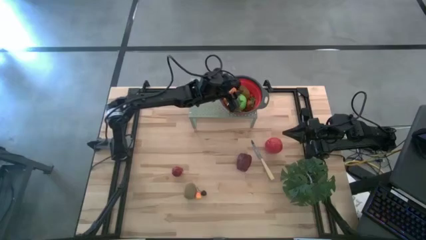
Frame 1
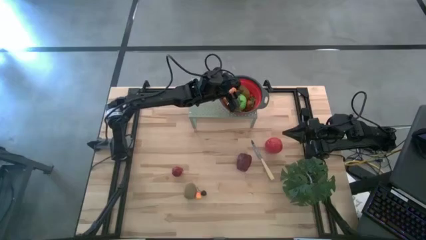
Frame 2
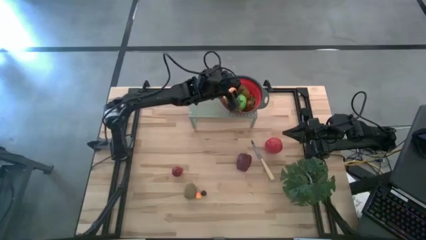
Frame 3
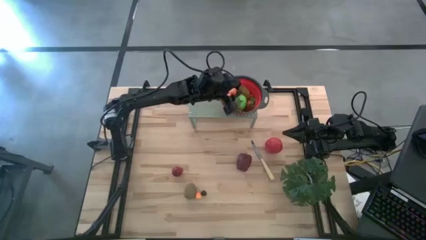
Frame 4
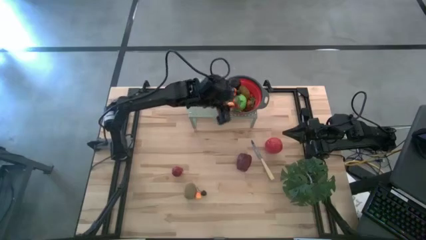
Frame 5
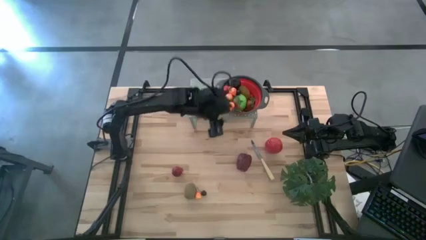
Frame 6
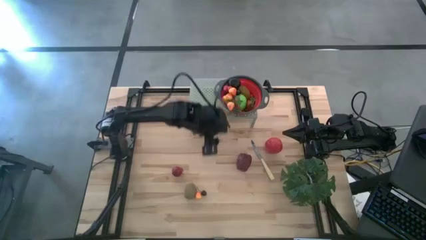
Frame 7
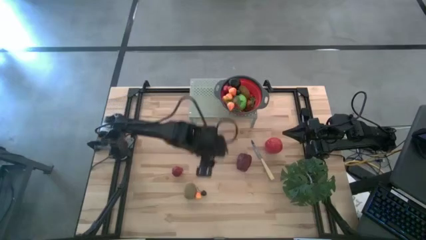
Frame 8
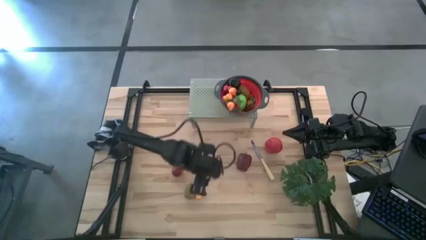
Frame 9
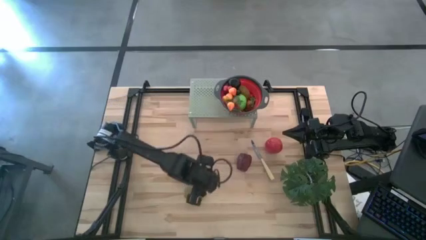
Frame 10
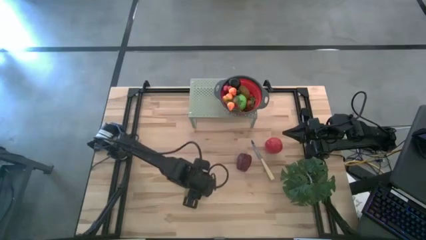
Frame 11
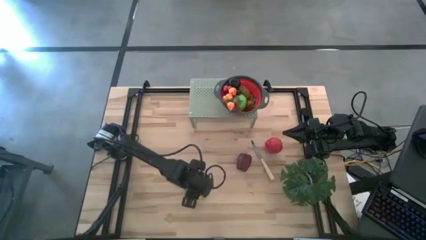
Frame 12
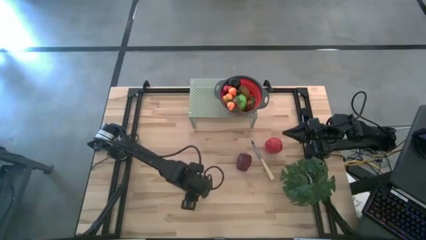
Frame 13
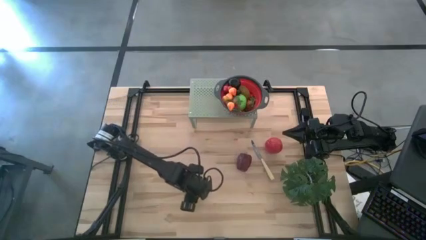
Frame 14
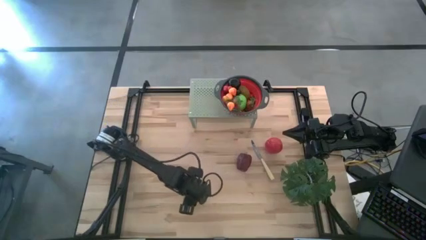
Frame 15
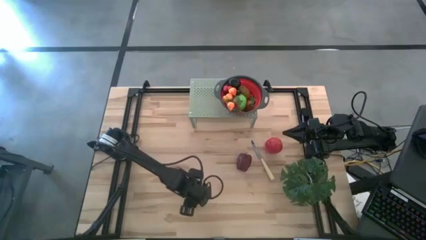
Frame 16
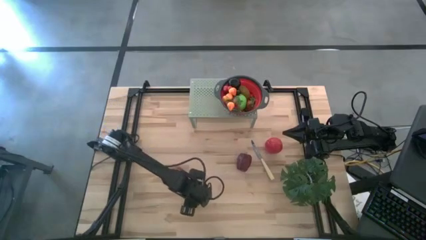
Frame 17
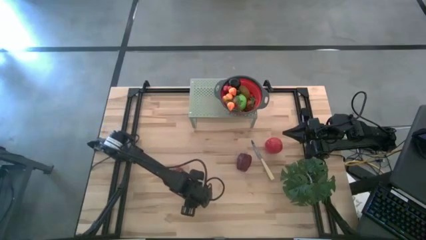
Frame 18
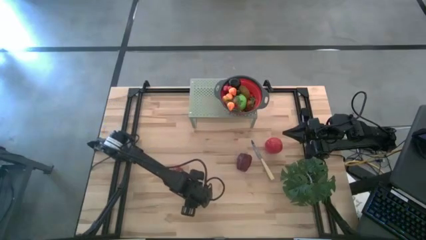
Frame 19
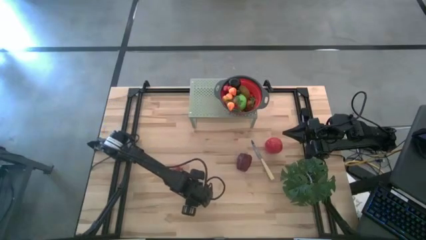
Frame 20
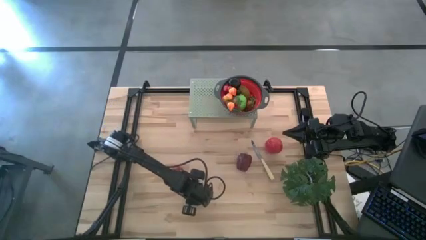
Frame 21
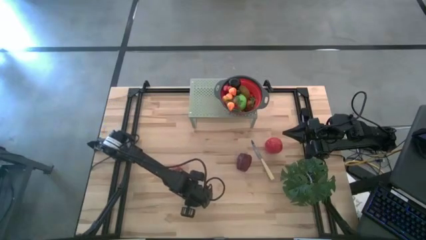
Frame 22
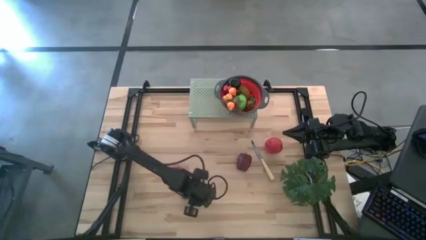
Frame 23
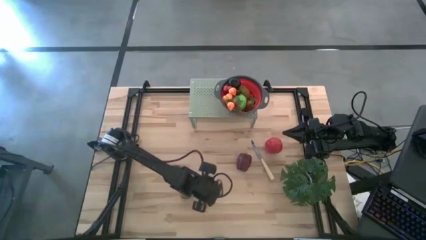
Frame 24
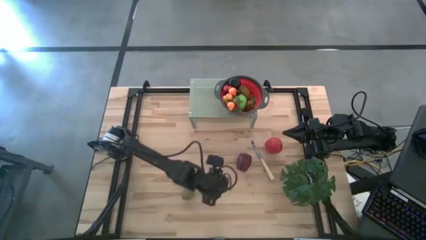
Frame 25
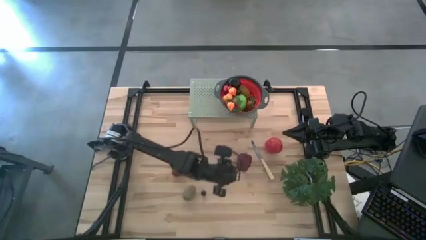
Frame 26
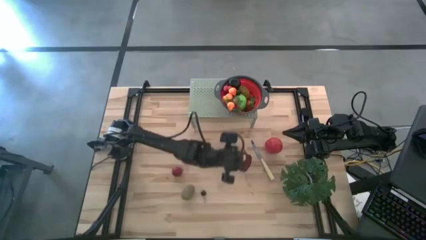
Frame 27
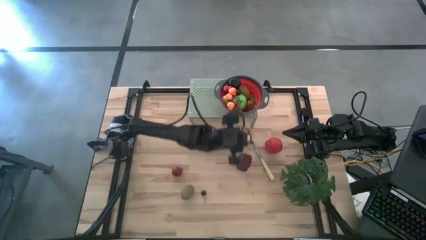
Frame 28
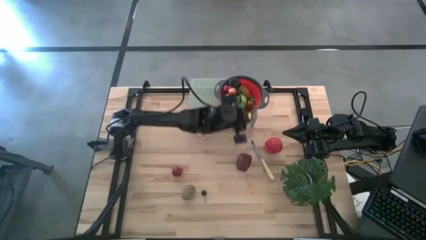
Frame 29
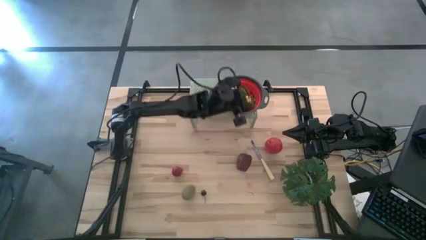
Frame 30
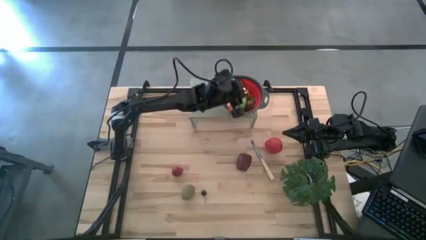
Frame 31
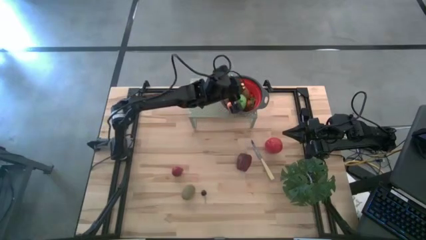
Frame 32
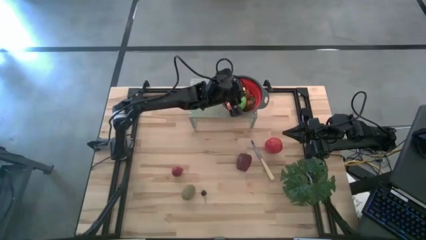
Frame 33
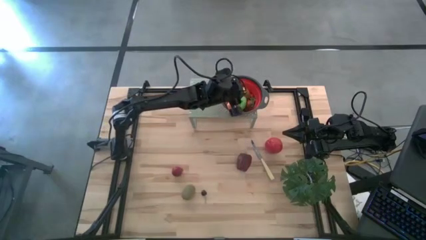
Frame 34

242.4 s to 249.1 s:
Task: Pick & Place Fruit
Put the orange peach into the black strainer bowl on the shelf

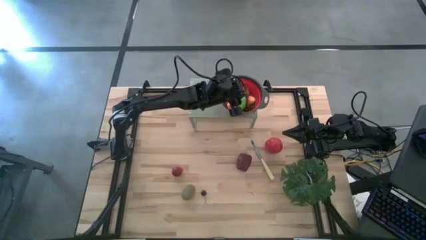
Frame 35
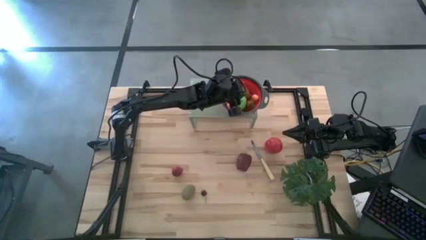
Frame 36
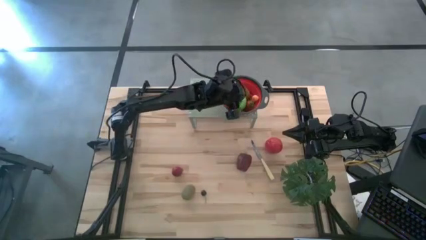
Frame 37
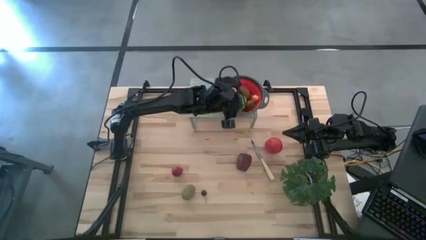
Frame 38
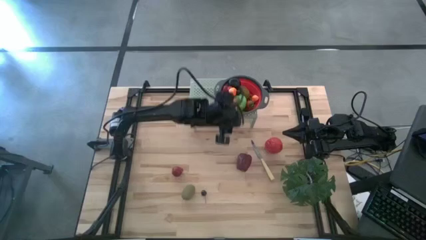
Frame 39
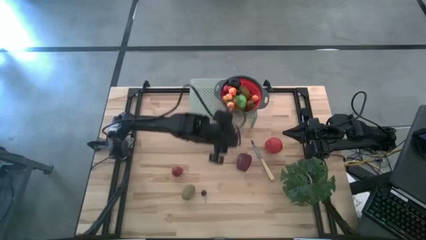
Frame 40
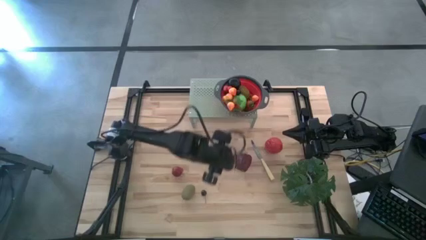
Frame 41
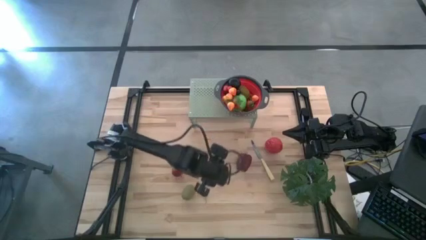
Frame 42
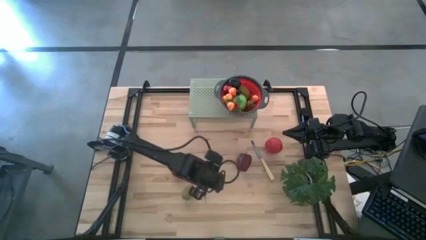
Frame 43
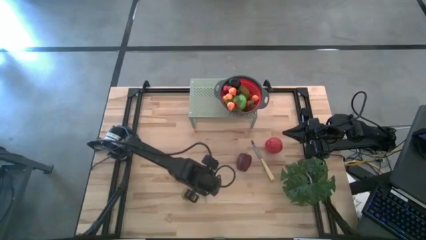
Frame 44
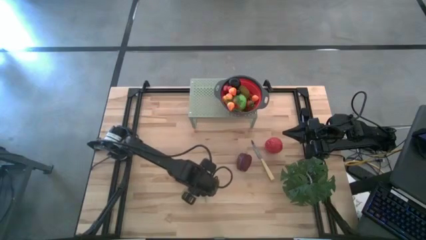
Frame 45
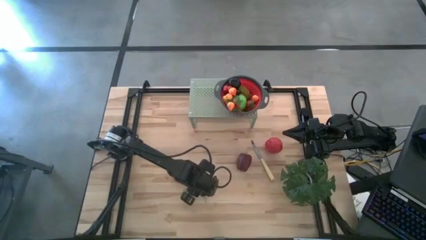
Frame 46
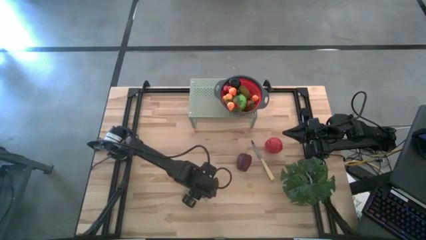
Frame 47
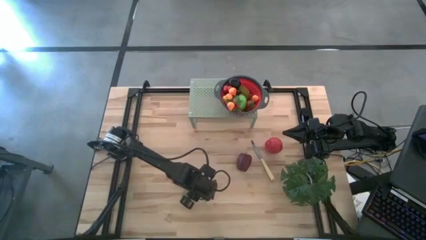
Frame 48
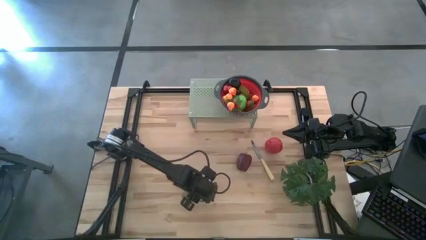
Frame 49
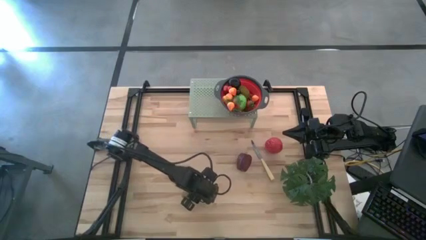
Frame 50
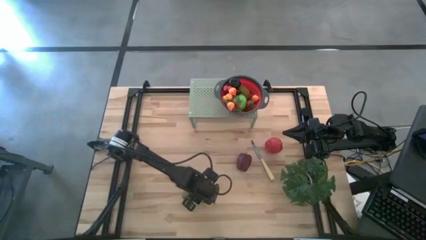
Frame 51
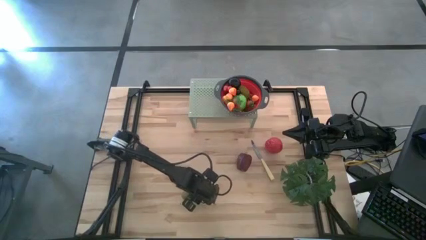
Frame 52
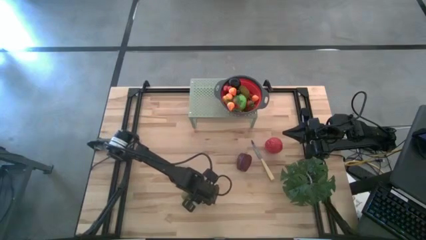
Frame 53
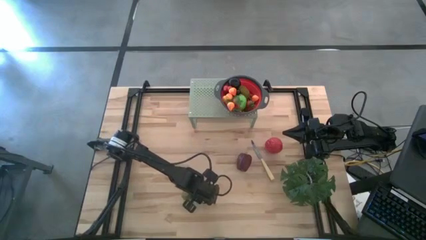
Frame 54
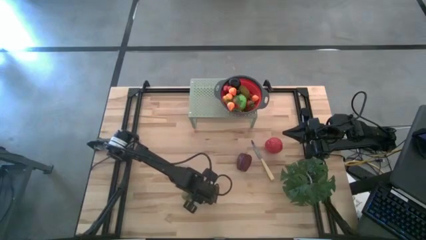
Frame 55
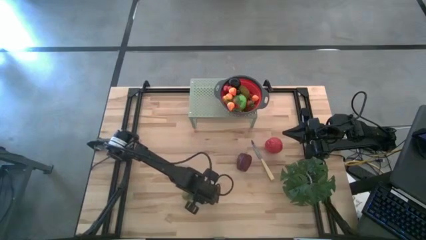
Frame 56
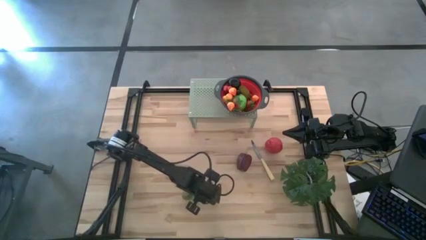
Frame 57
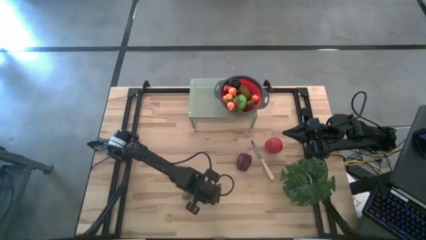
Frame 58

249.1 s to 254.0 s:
Put the black cherry into the black strainer bowl on the shelf

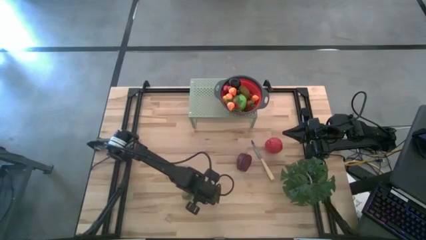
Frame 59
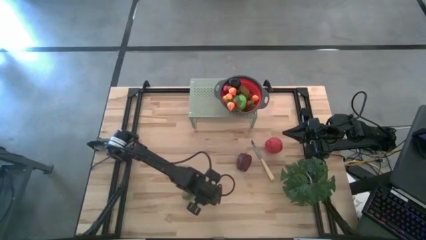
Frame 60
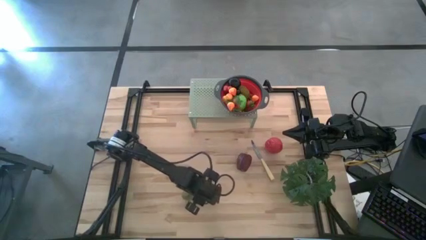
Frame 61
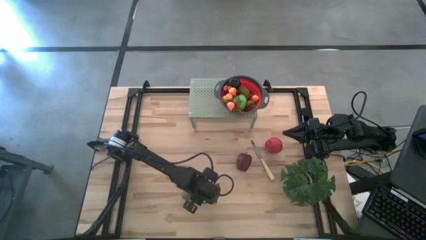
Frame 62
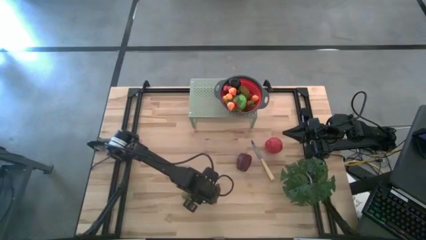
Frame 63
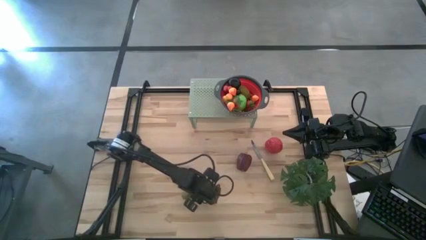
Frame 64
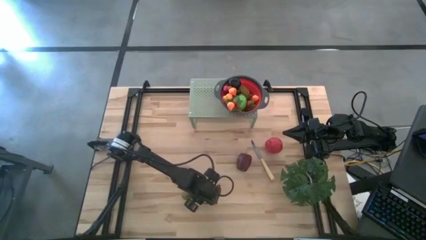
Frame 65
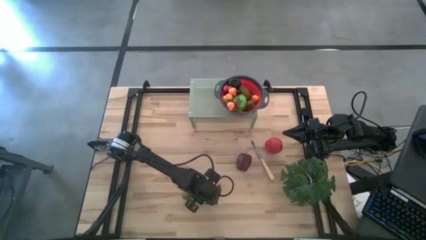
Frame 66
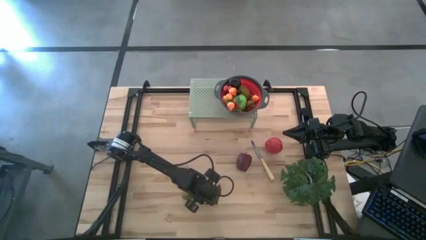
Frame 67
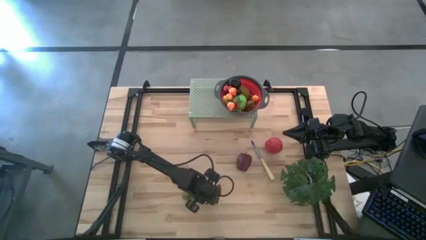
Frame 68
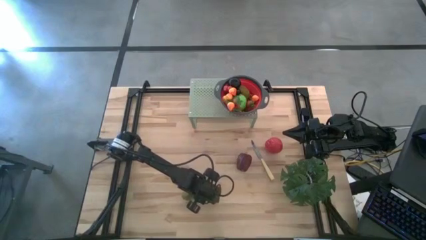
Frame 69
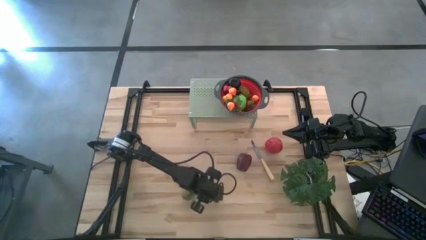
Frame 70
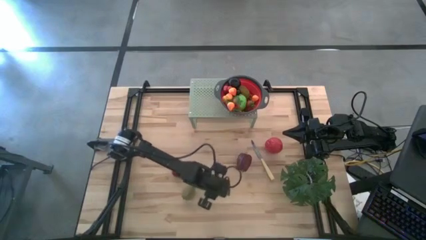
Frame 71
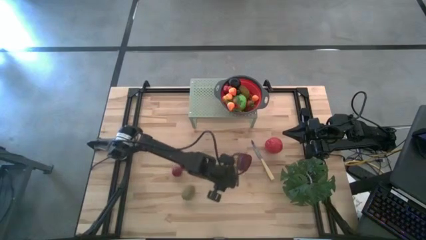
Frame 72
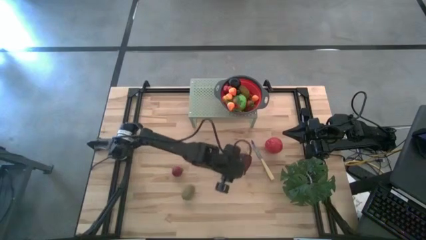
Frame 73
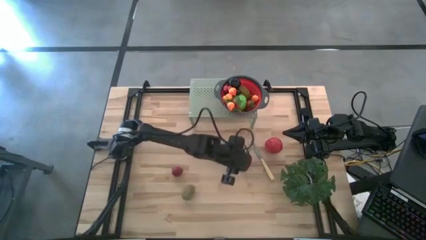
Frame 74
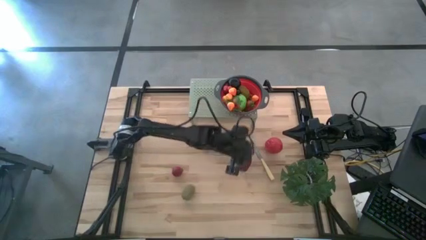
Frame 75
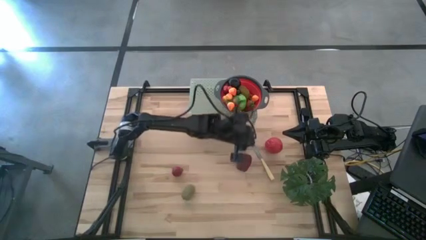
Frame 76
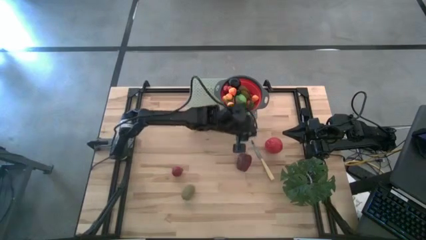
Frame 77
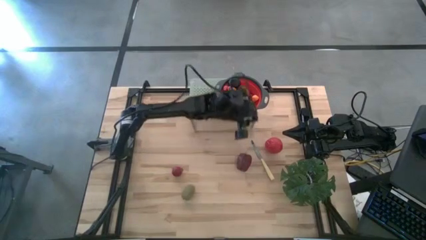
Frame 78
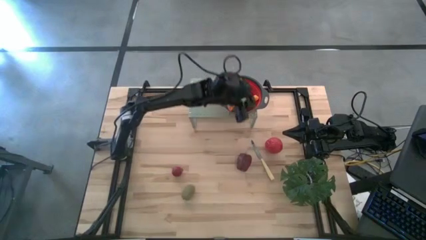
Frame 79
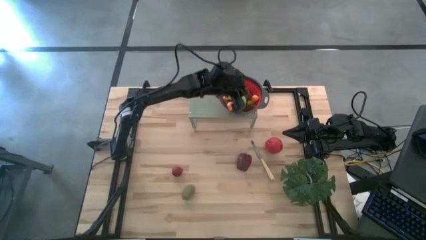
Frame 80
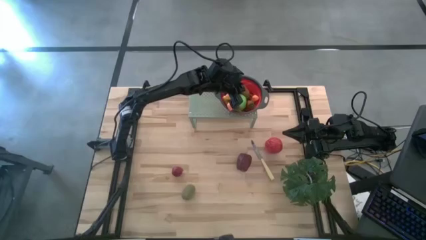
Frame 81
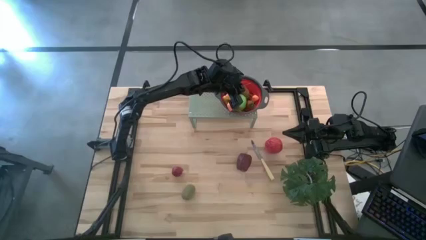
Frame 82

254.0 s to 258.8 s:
Put the black cherry into the black strainer bowl on the shelf
